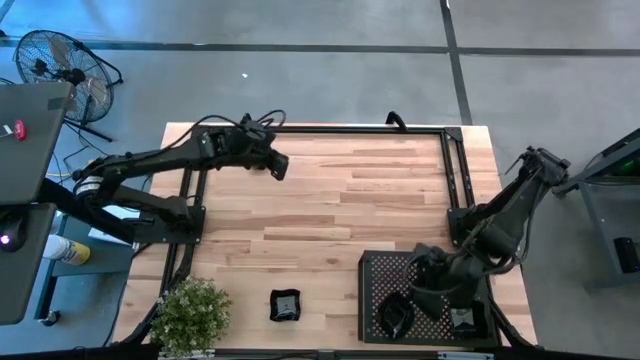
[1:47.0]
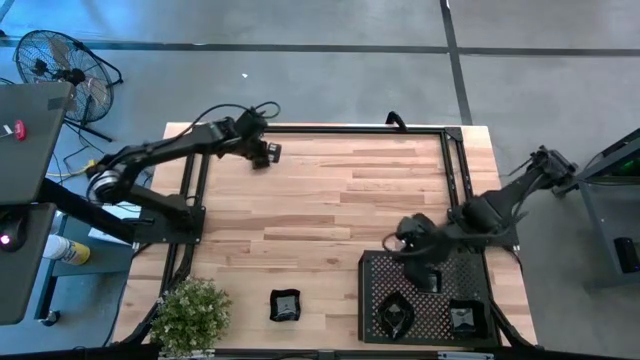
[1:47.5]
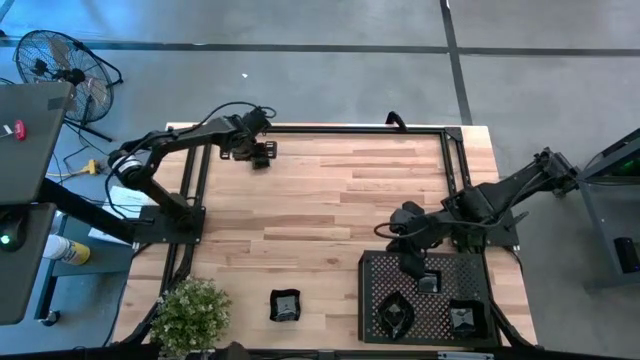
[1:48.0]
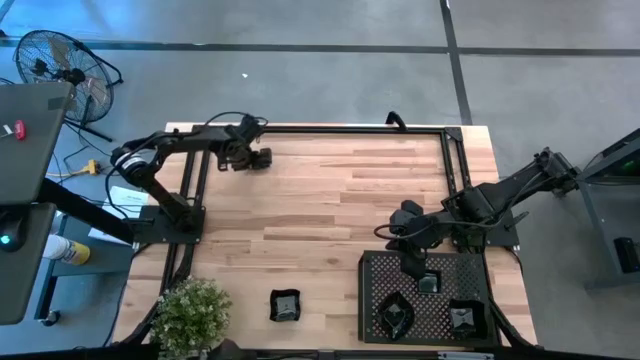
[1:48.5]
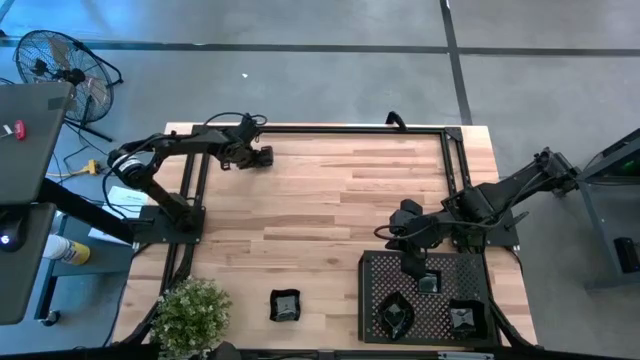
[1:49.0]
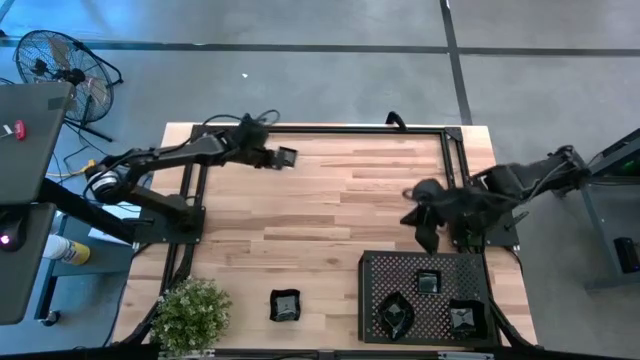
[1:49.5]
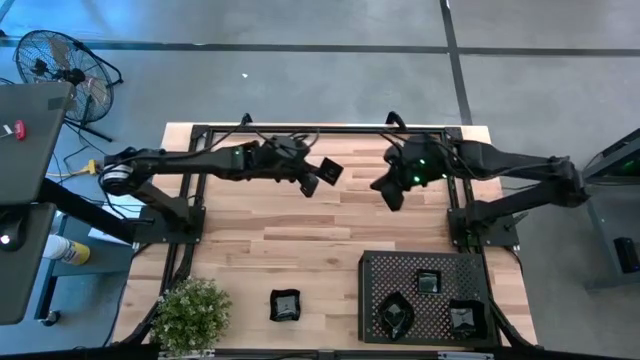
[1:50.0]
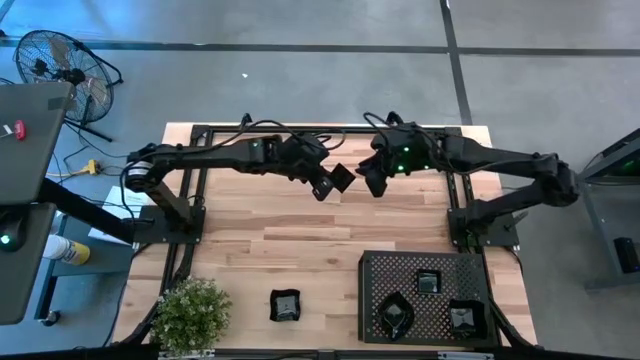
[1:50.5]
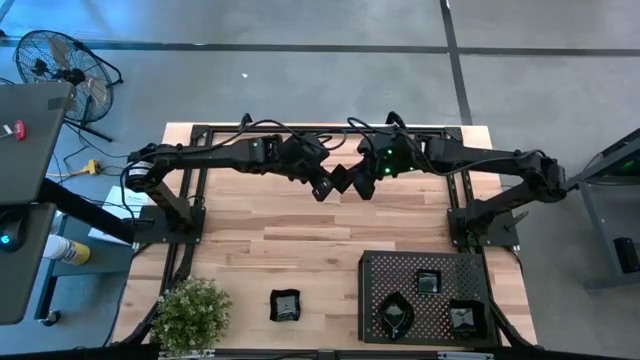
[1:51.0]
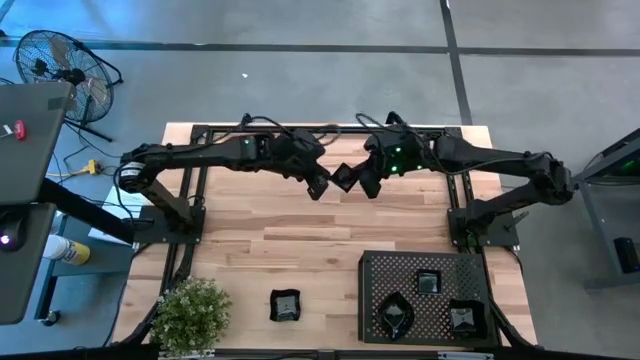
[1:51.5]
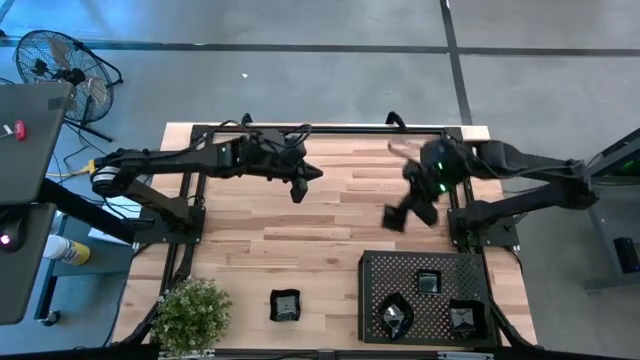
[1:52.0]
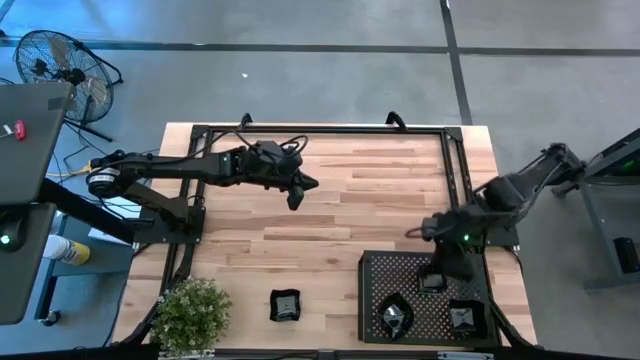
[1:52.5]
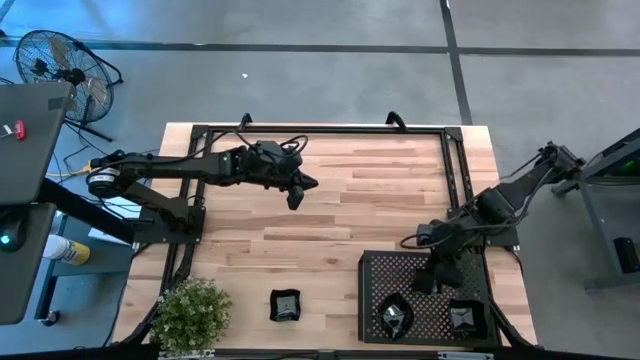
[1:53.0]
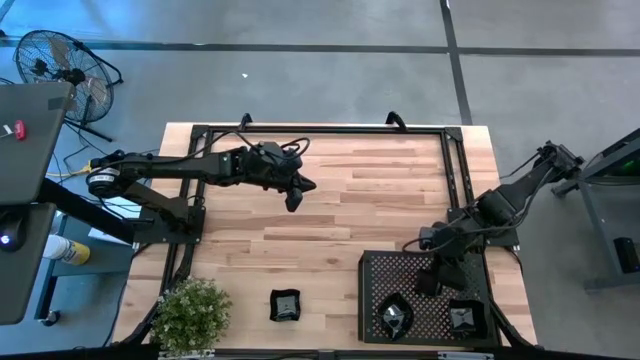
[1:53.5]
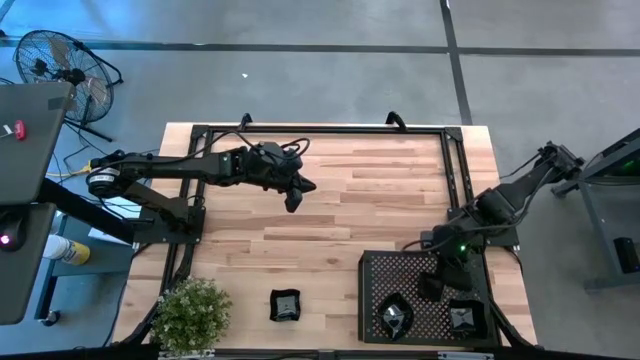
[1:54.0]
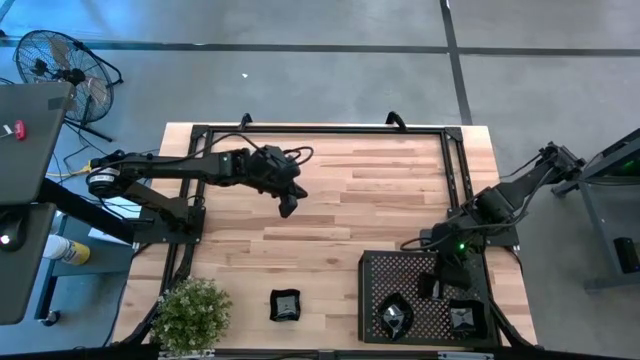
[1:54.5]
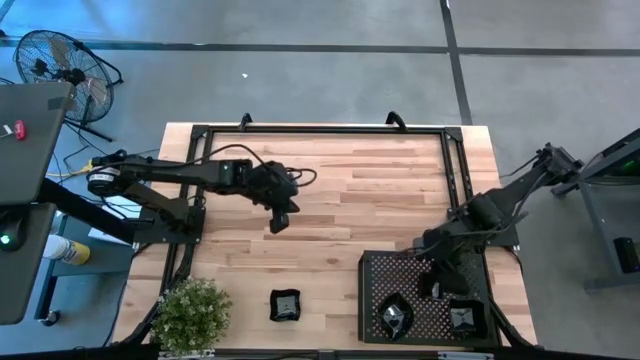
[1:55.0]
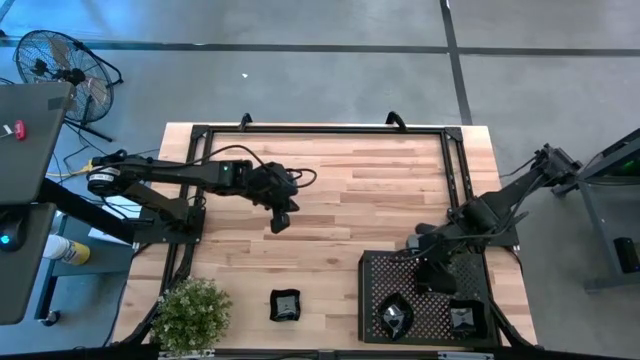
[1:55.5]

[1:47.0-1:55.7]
Task: Pick & Place Mini shaped plates
Stack the black square plate on top of the black square plate on the shelf

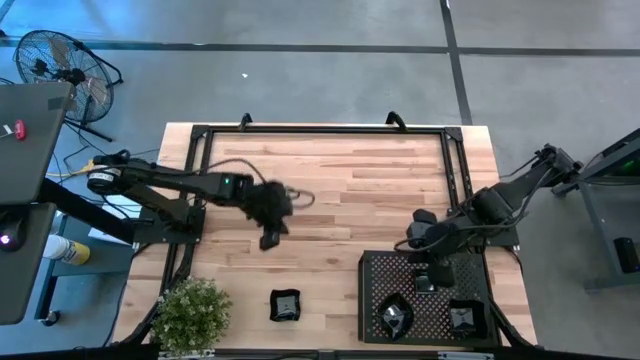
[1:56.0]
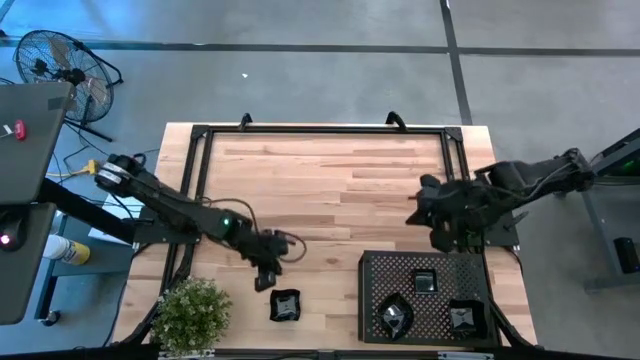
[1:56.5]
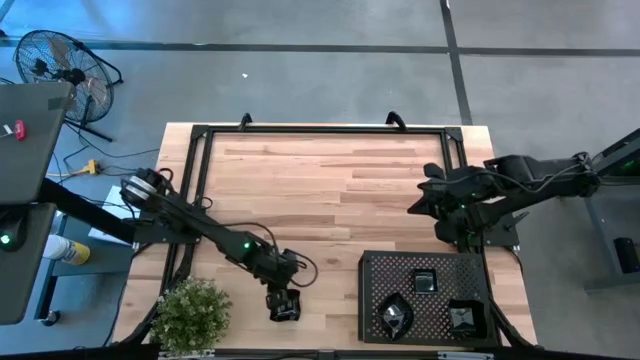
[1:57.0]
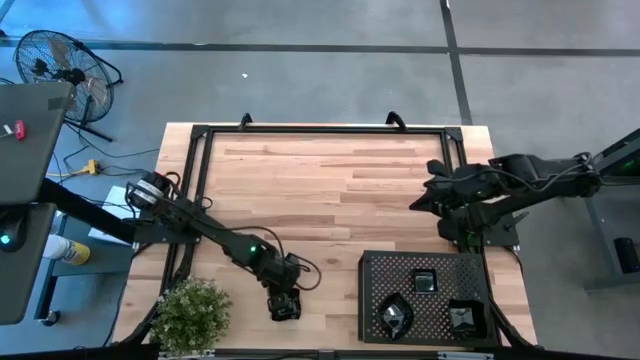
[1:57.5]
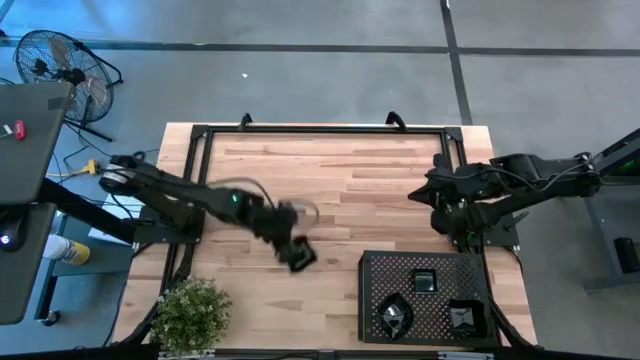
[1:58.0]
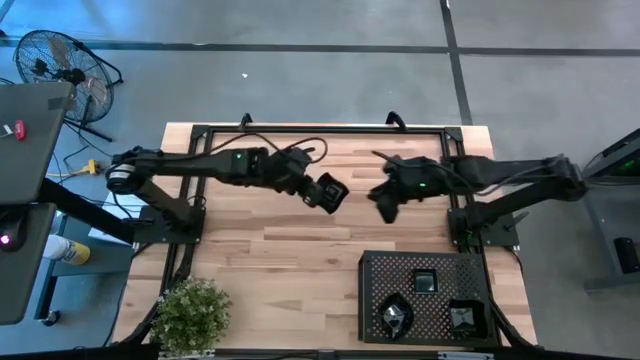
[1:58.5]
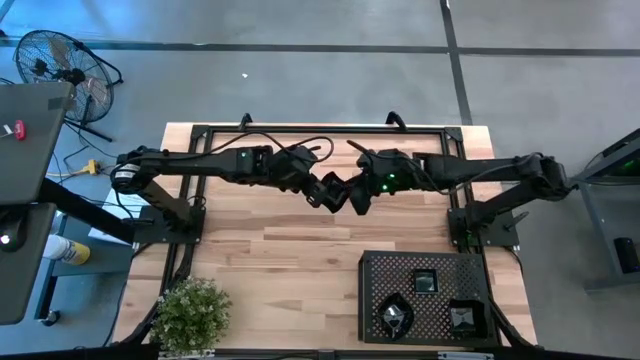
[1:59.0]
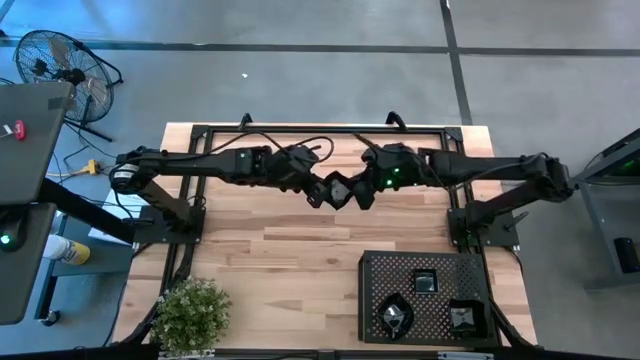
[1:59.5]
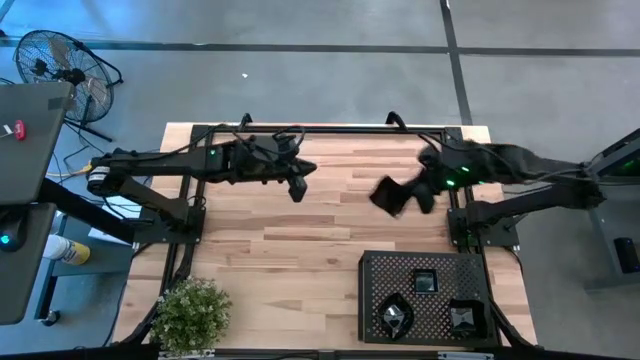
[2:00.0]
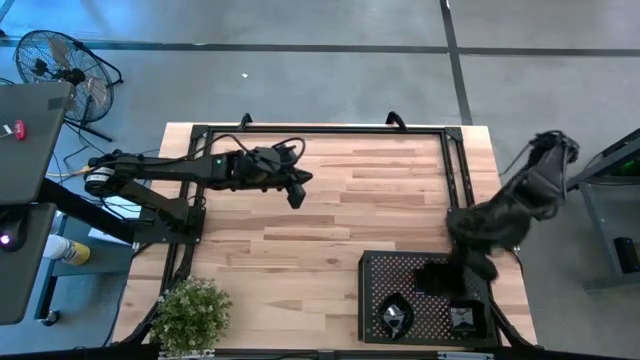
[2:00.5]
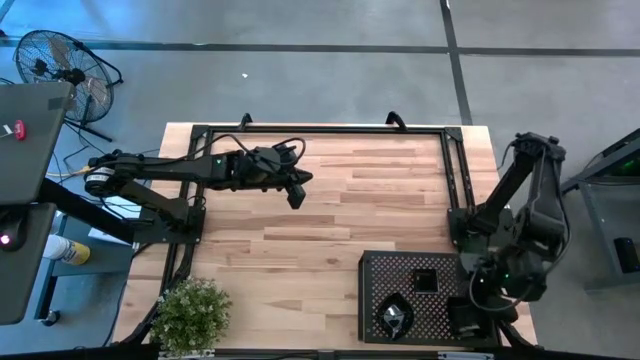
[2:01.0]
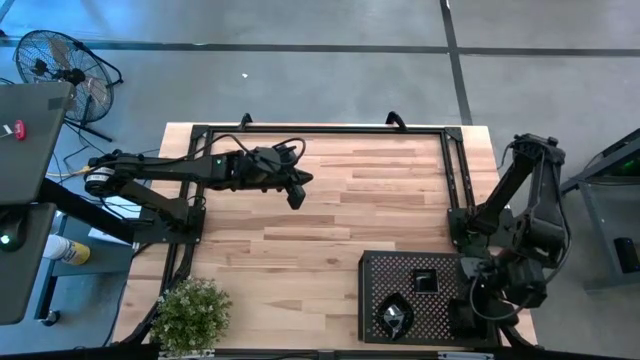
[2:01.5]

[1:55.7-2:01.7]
Stack the black distorted square plate on top of the black distorted square plate on the shelf

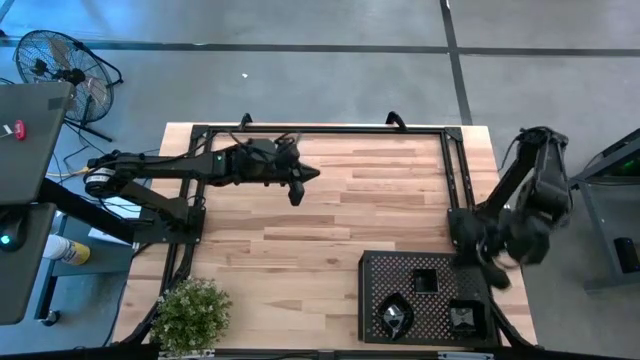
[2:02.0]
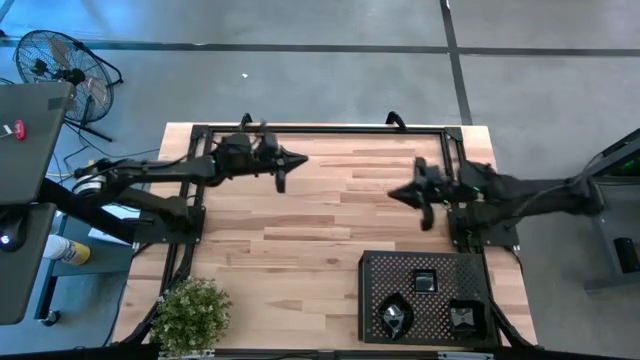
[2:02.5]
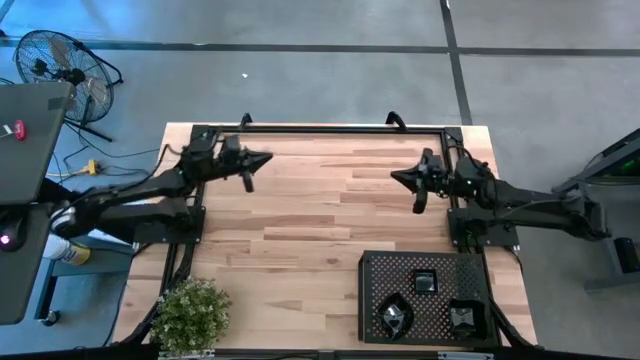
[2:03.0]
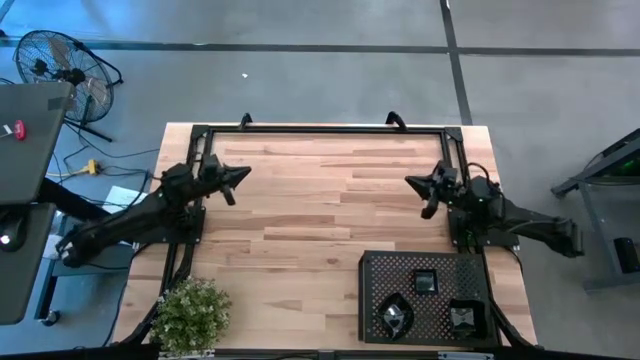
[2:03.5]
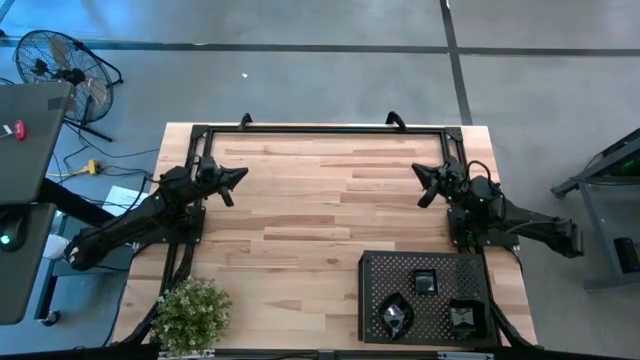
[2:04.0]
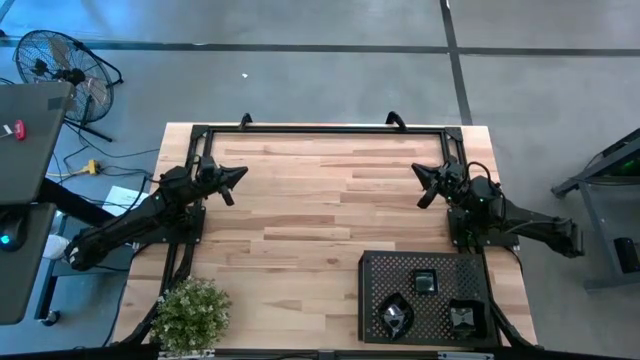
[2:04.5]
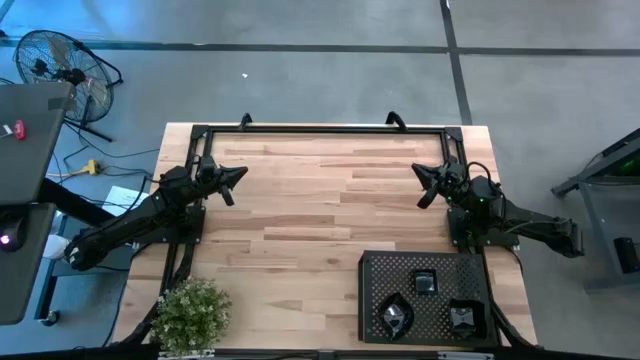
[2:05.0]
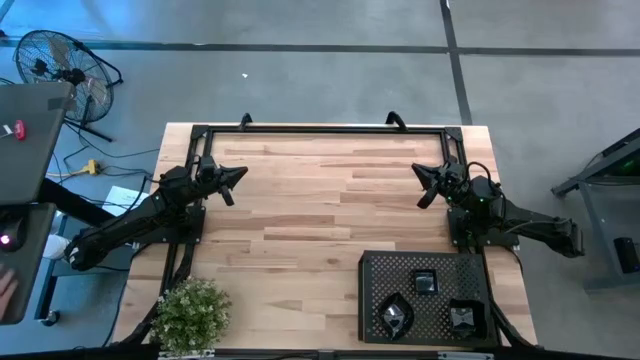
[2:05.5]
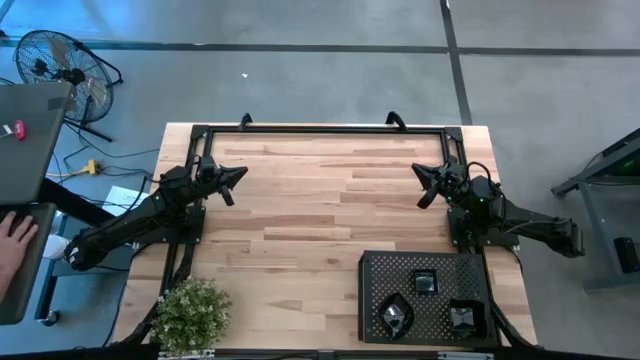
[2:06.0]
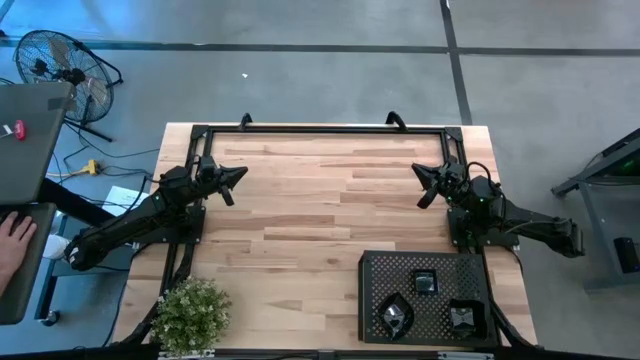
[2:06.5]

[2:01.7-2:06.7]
Return to home position
